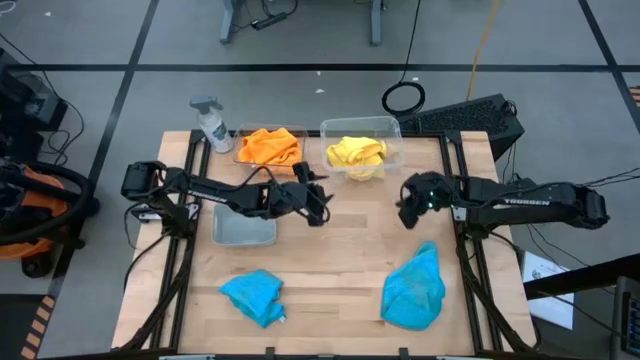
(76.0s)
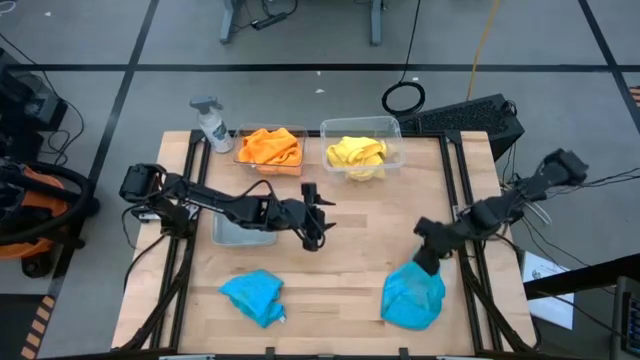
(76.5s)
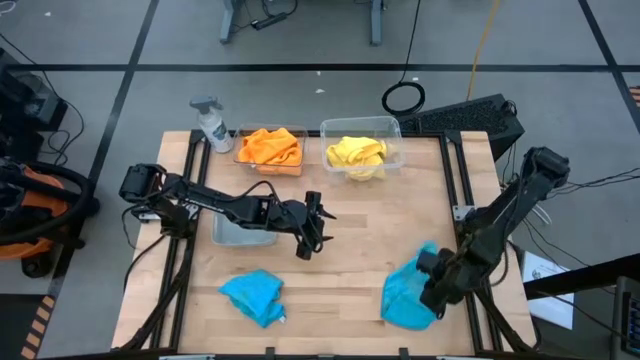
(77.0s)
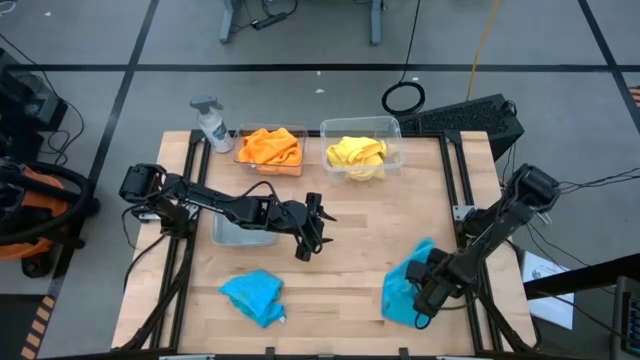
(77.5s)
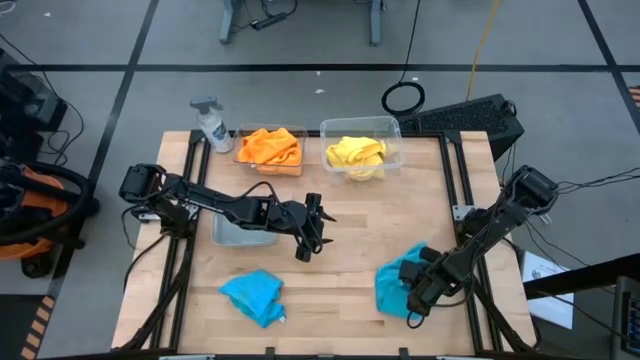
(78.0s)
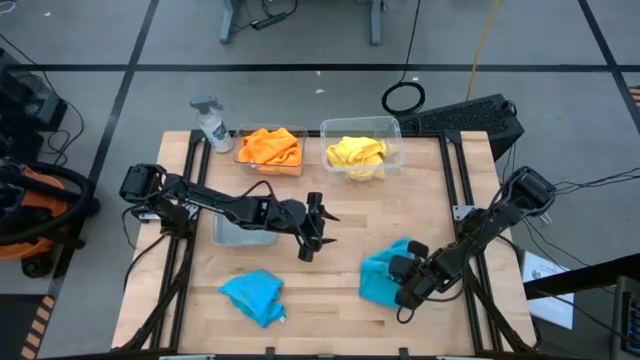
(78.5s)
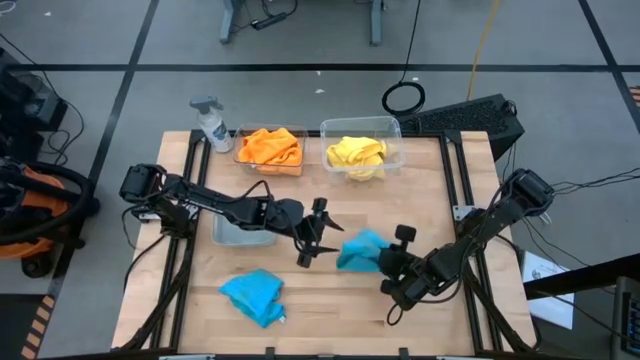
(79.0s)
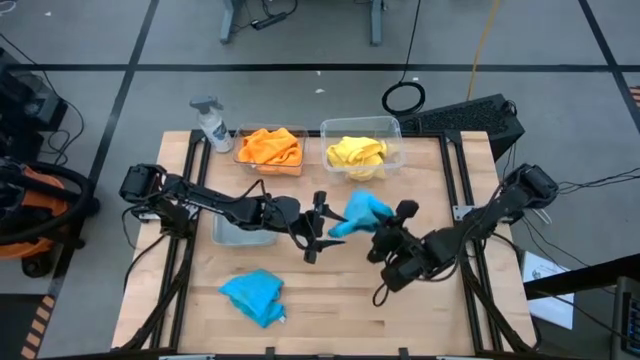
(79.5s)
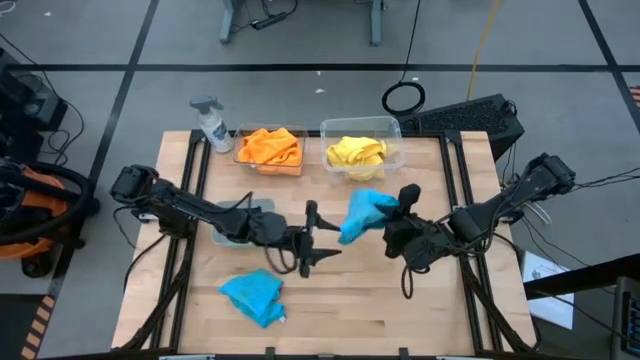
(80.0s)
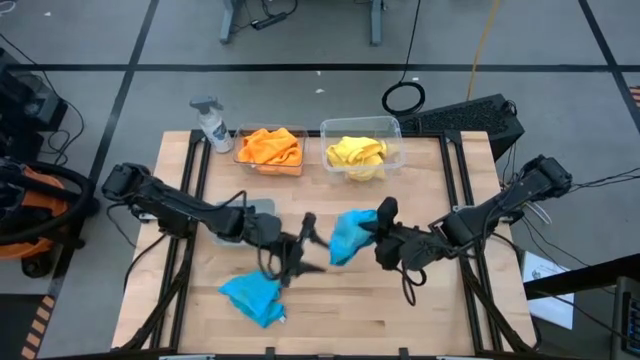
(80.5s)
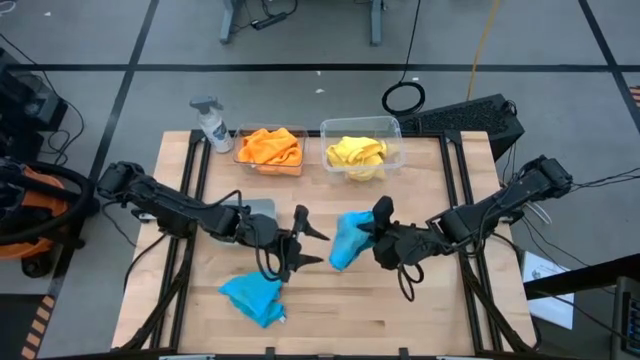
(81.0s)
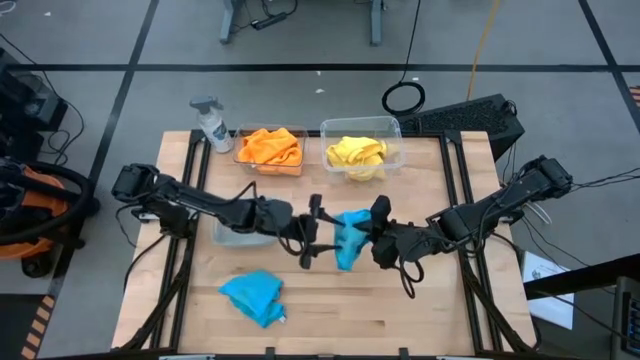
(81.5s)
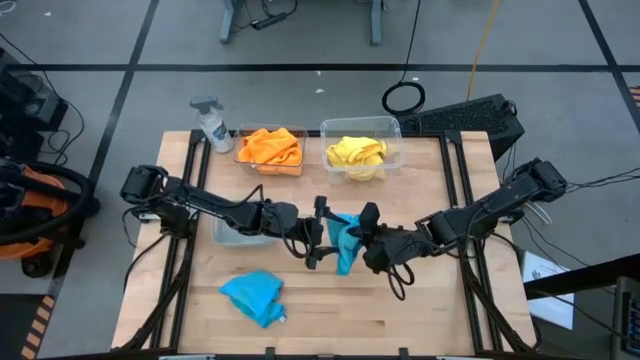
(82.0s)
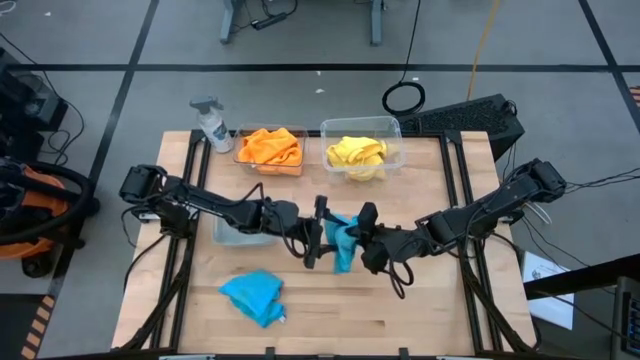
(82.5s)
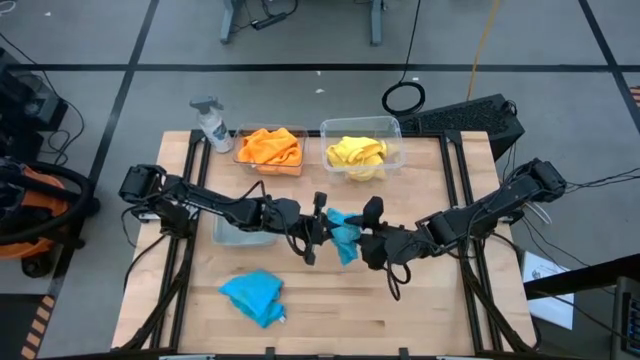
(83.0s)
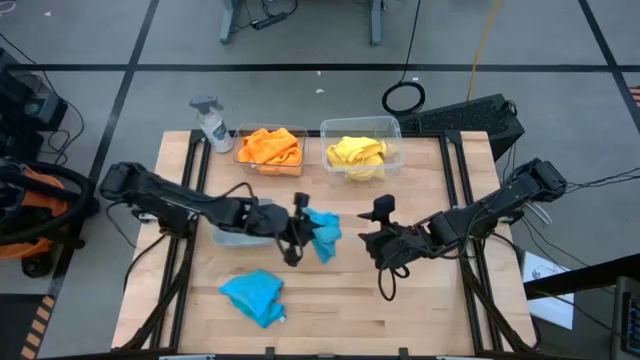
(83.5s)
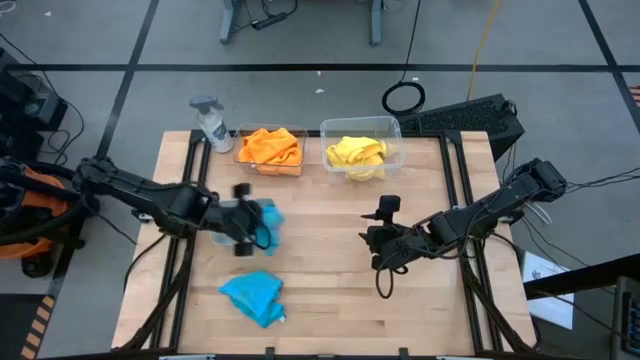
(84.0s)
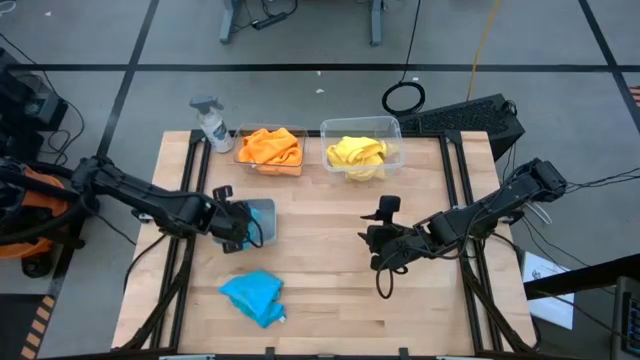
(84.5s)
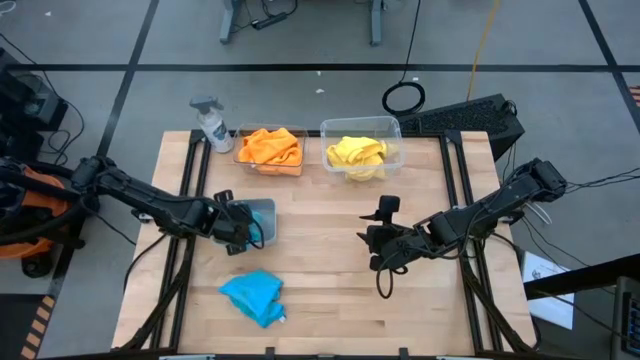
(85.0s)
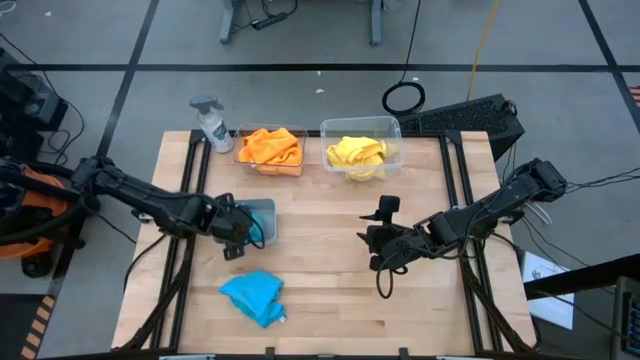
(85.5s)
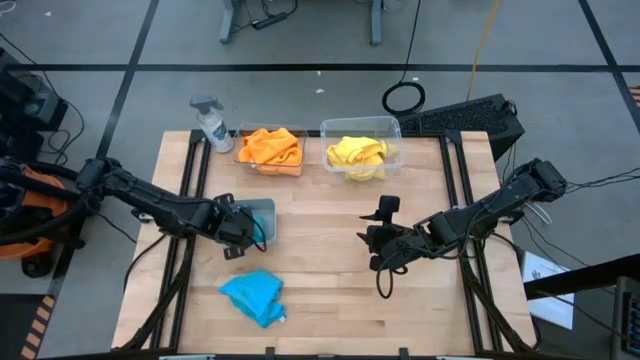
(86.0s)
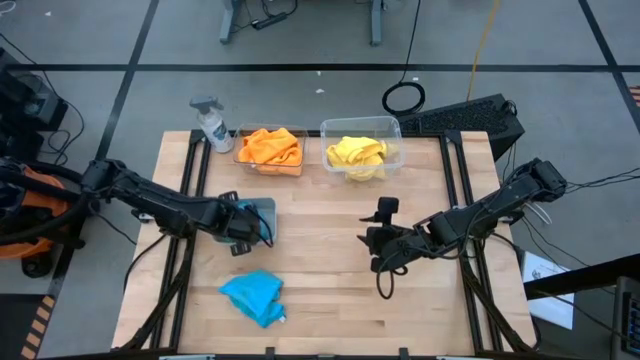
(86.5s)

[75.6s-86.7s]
Task: Sort microfiber towel by color & place in baskets
Put the right blue towel into the gray bin

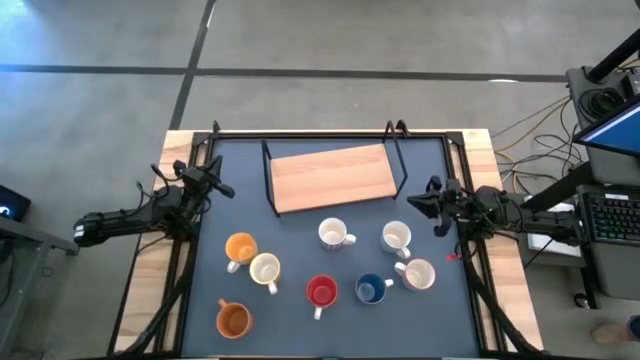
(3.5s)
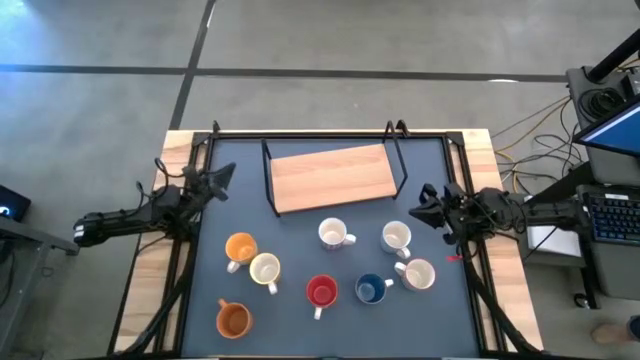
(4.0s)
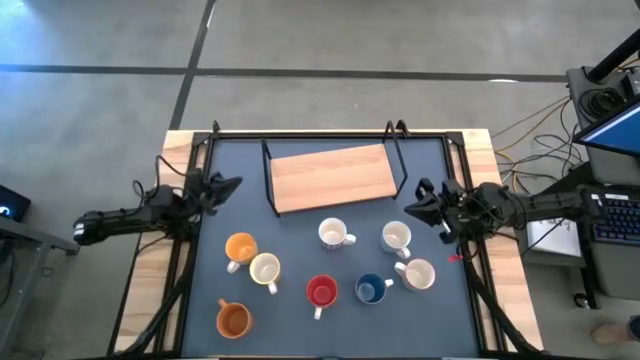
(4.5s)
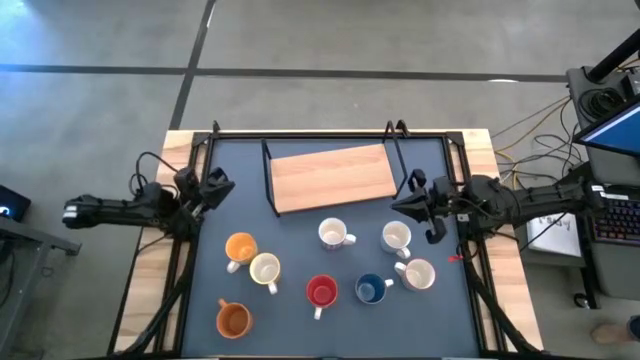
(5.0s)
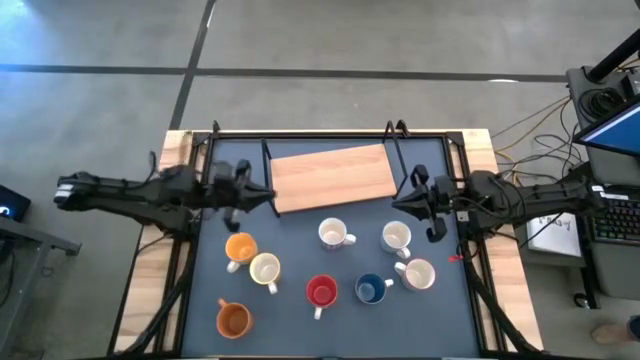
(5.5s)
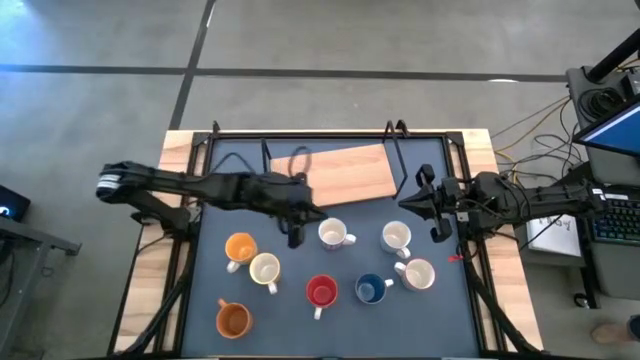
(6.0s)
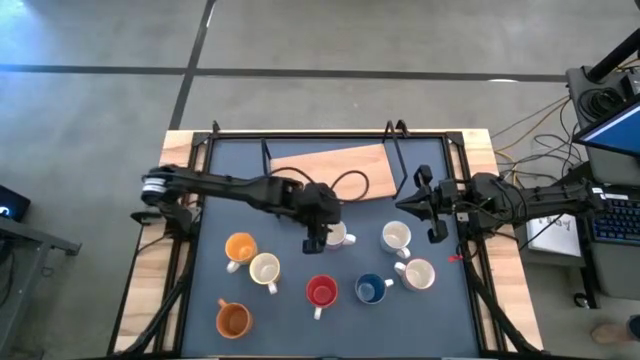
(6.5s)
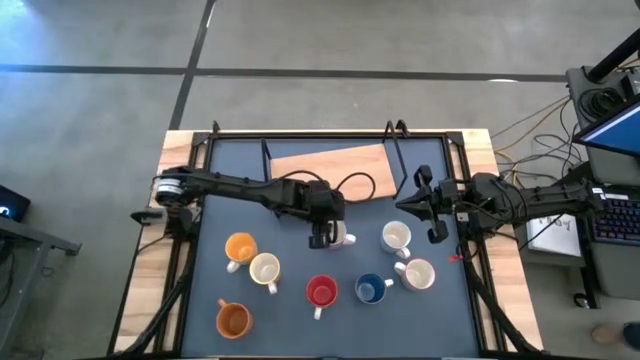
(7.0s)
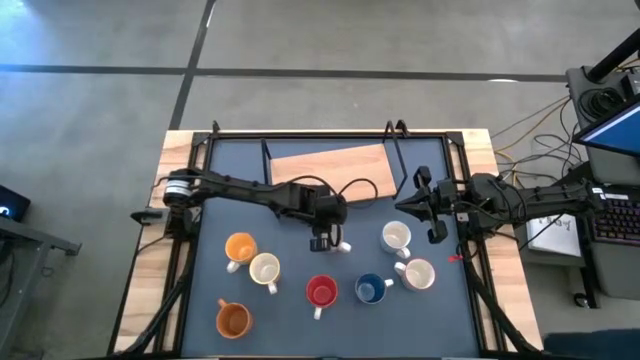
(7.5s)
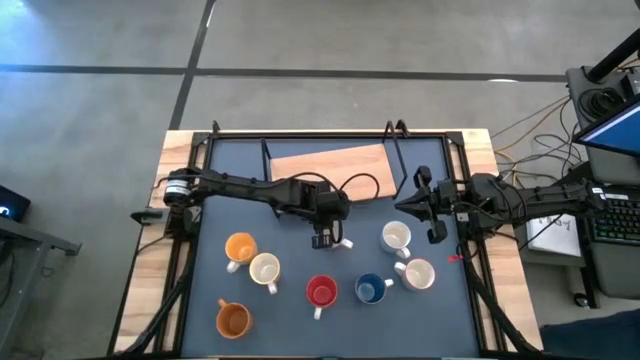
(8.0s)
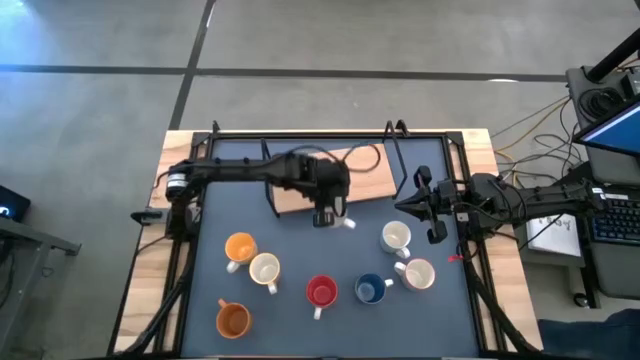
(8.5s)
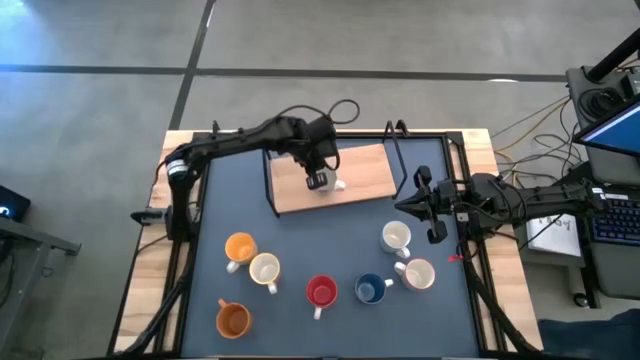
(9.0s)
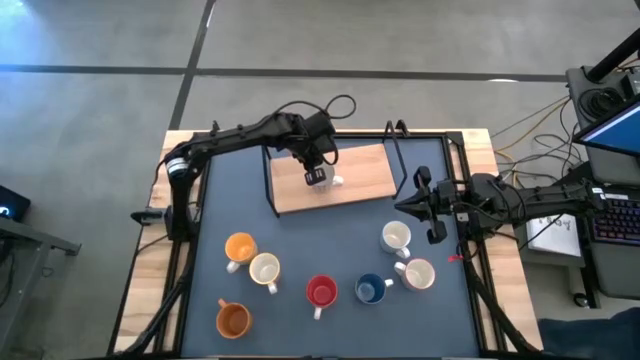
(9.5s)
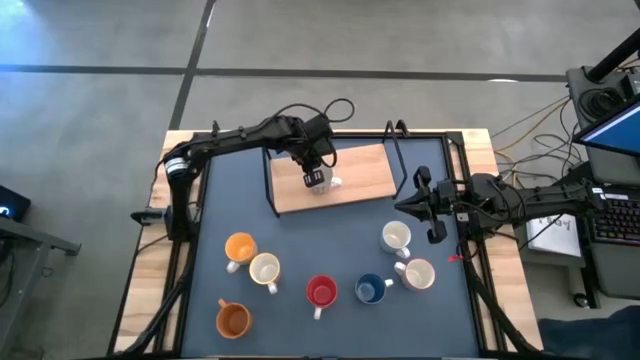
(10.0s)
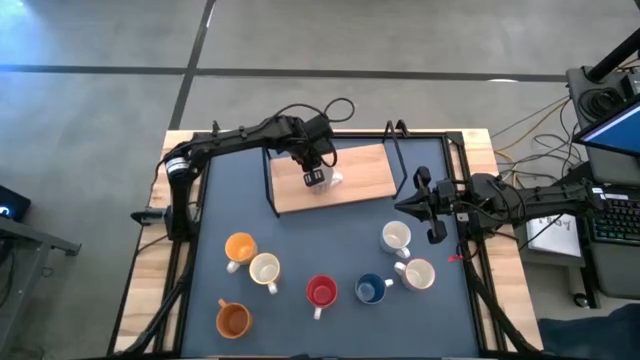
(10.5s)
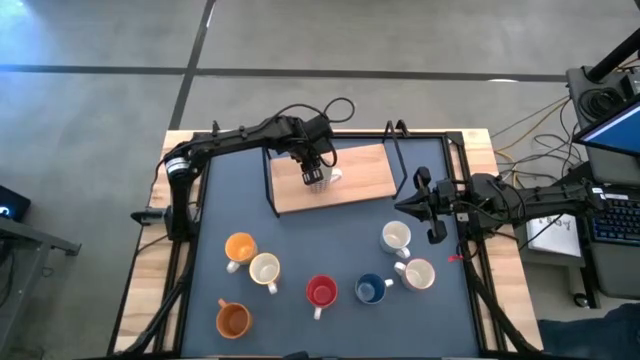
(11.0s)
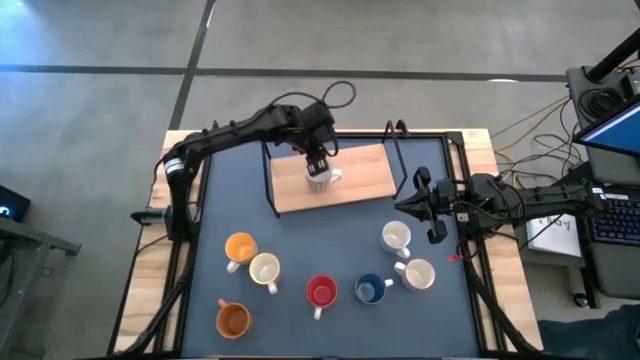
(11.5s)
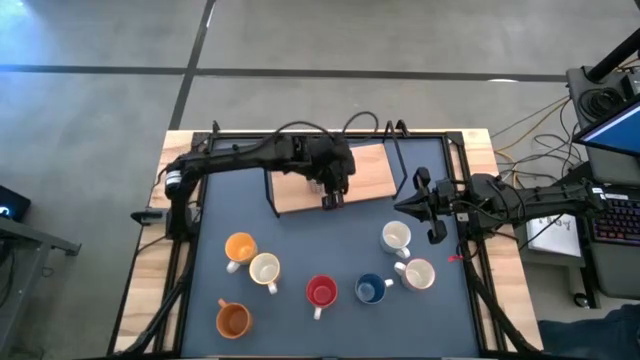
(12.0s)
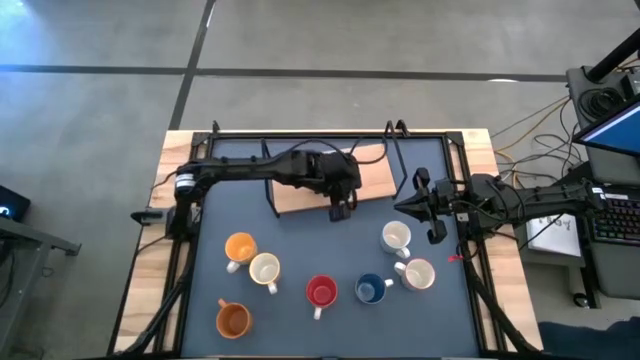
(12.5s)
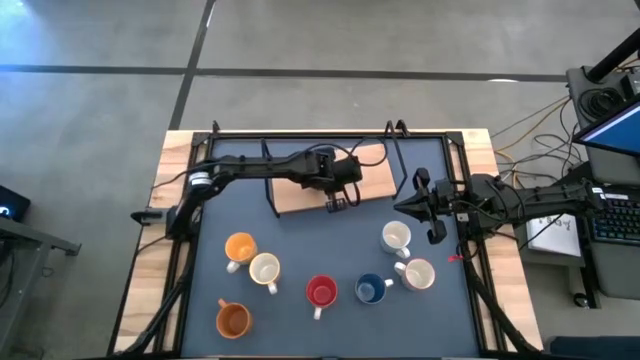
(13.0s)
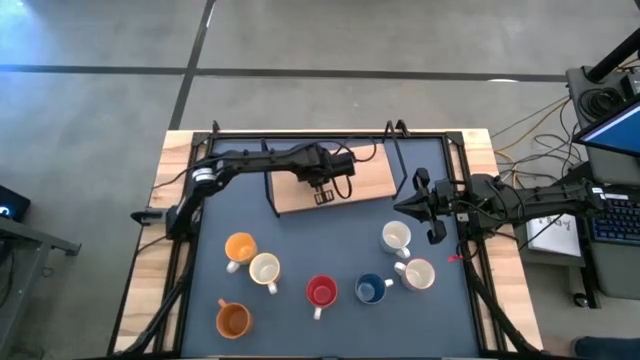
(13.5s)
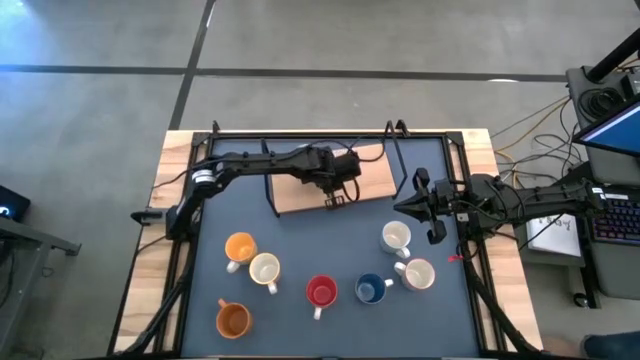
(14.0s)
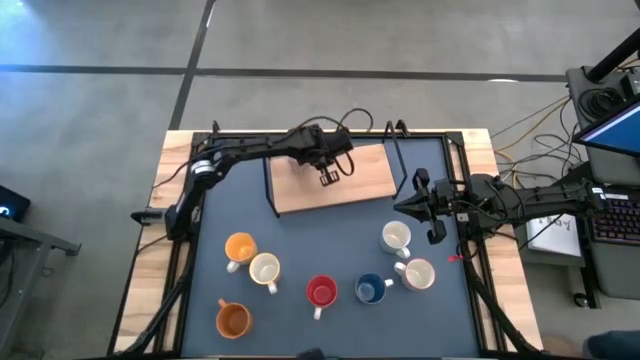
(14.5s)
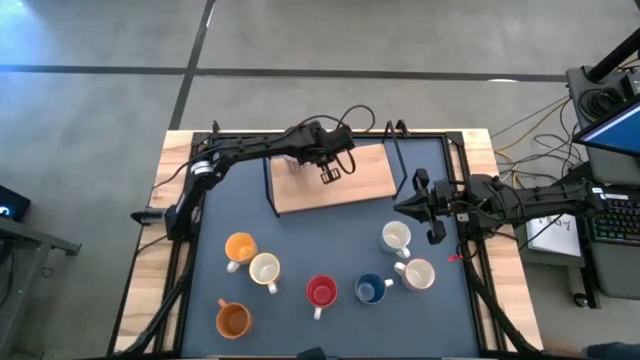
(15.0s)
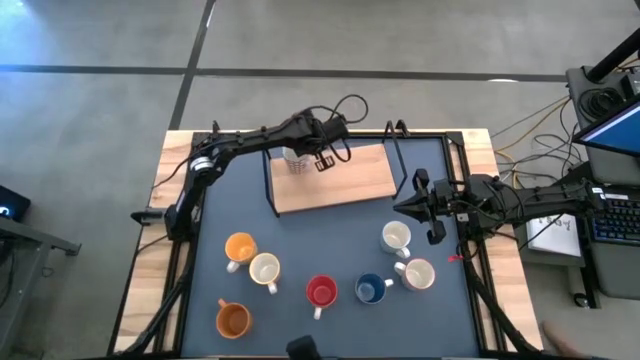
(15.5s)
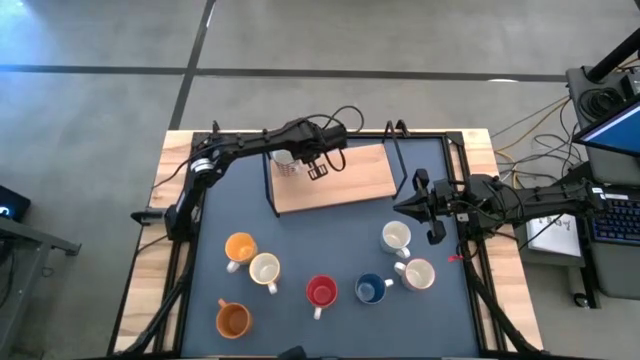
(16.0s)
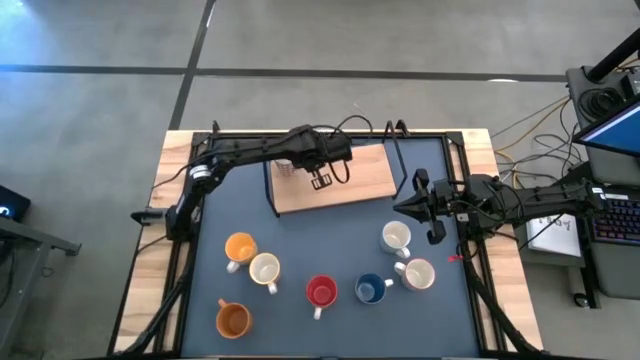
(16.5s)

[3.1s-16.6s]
Task: Place coffee mugs
Put the red patterned mug on the shelf
